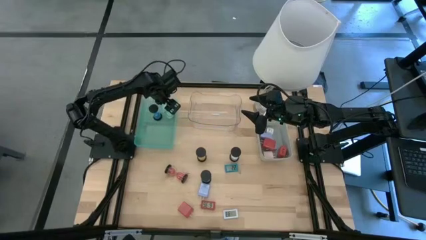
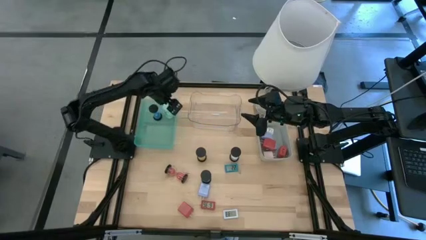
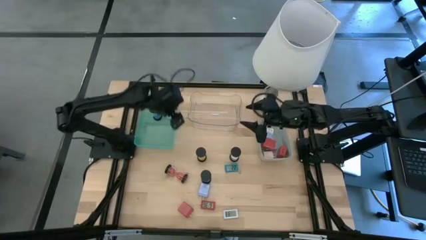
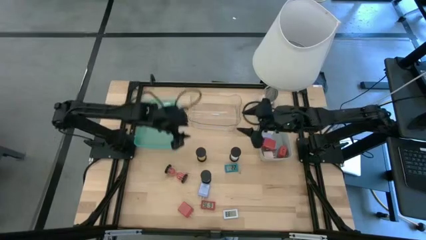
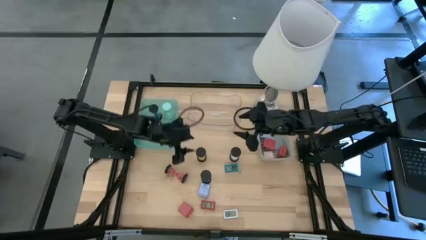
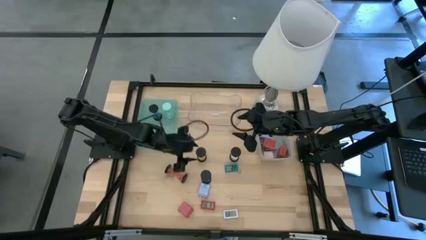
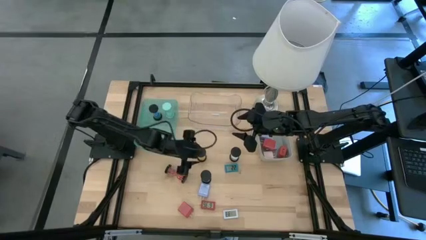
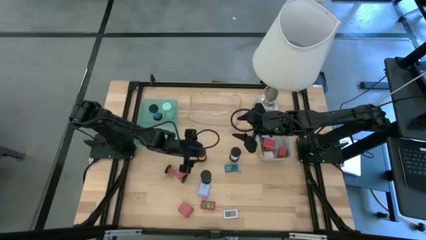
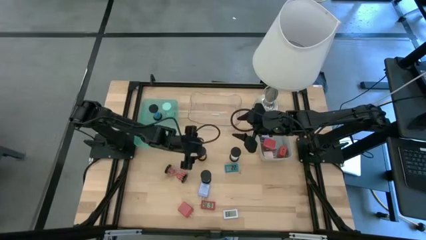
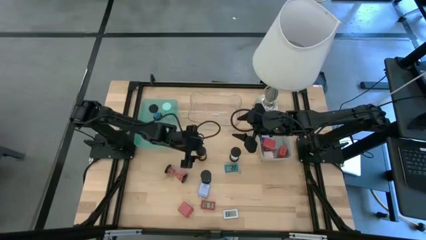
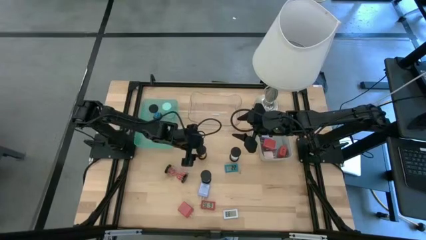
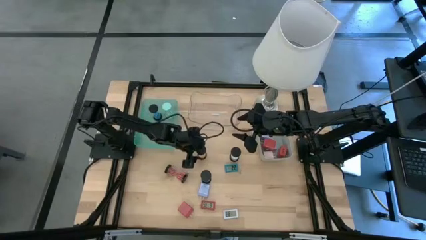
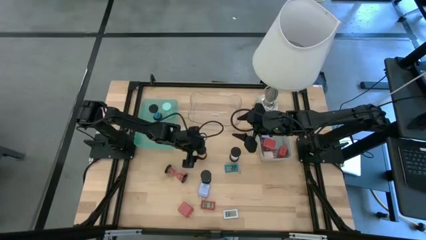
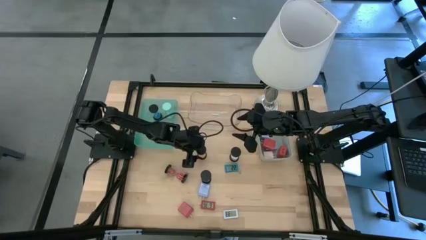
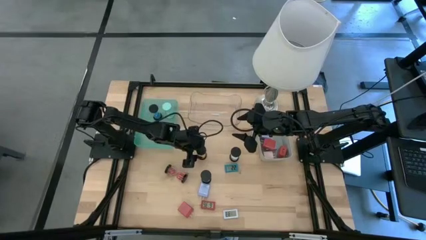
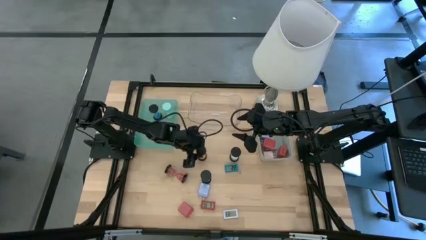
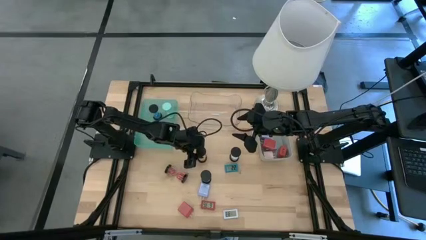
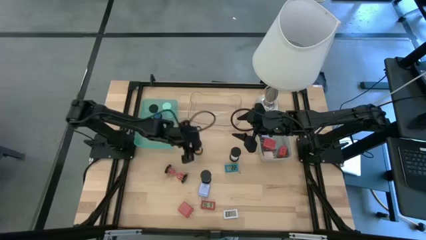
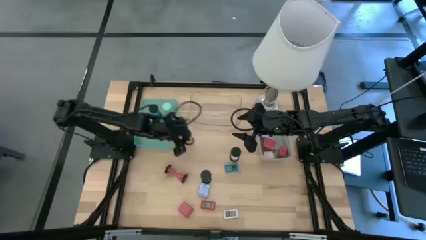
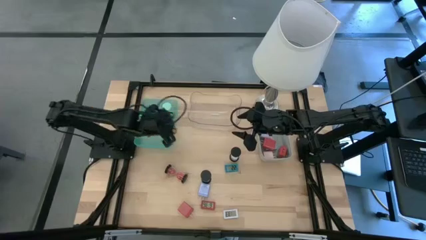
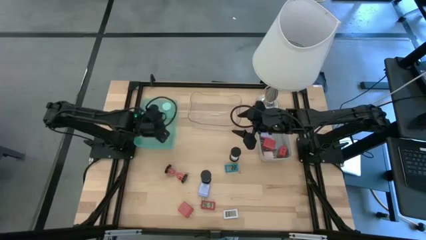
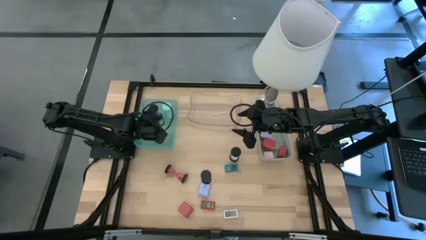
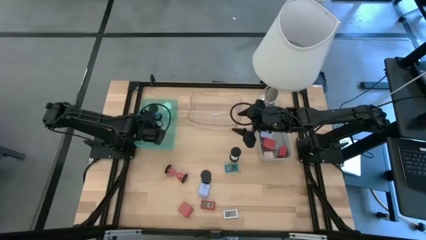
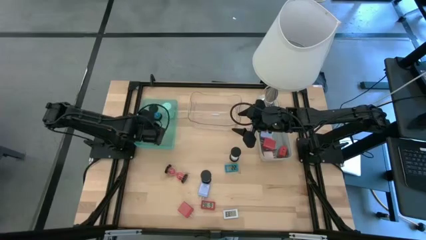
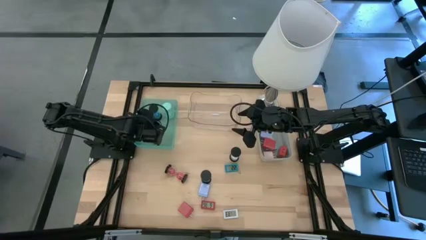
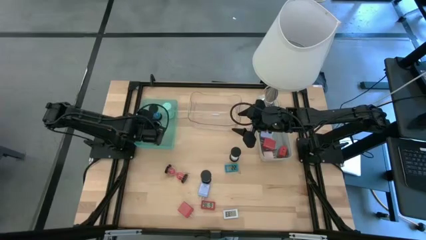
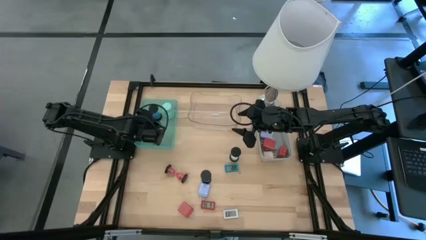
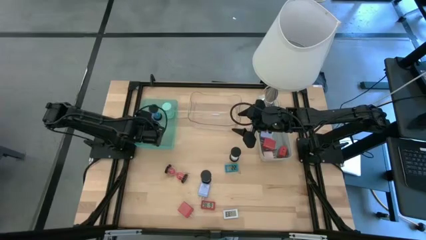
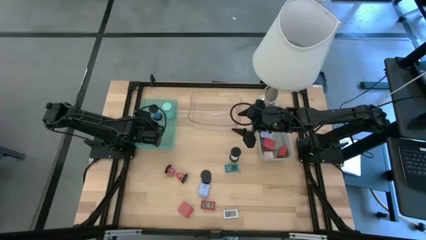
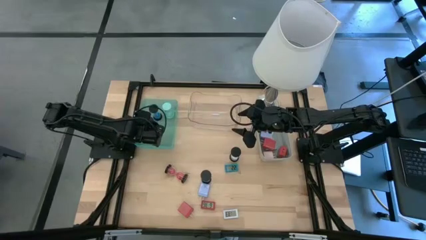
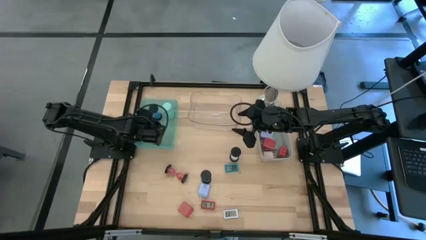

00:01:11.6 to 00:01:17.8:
Task: Pick & Place Office items
Put the black and orange hourglass into the green bin

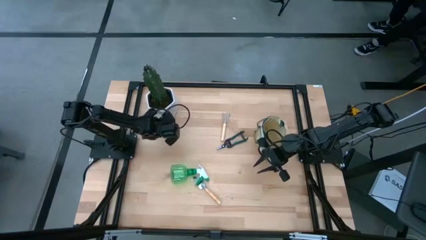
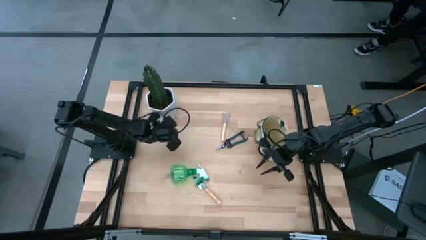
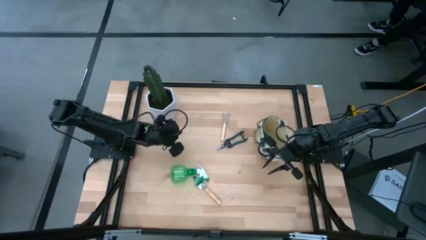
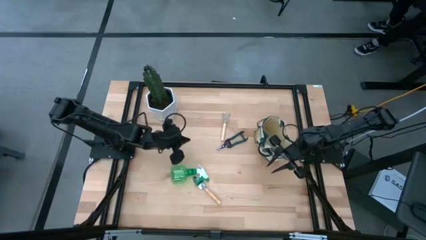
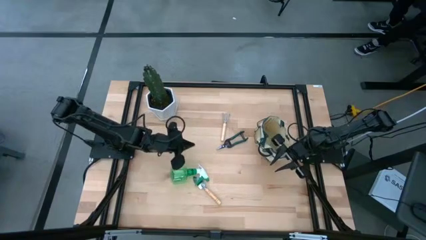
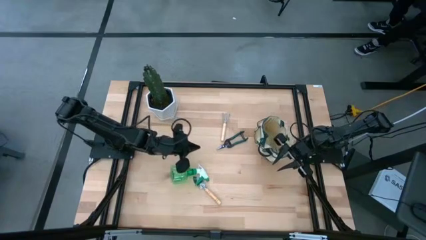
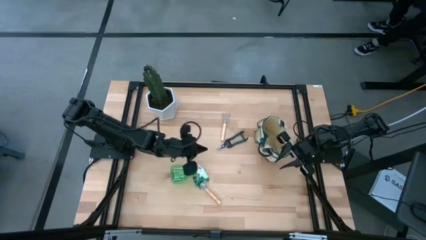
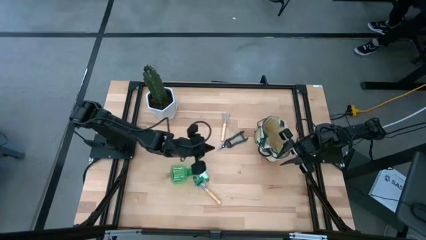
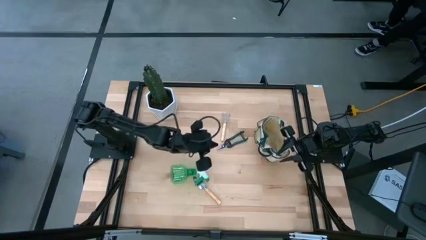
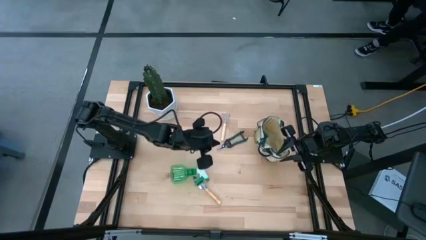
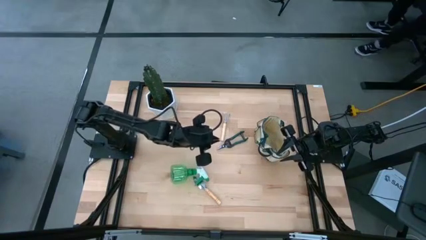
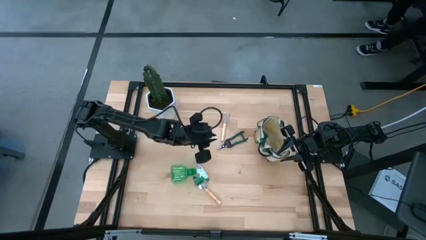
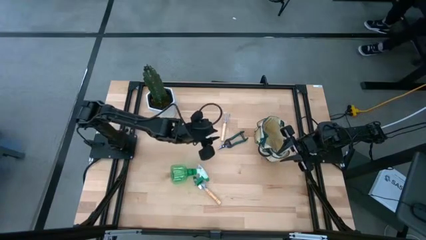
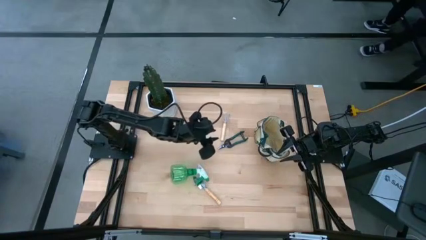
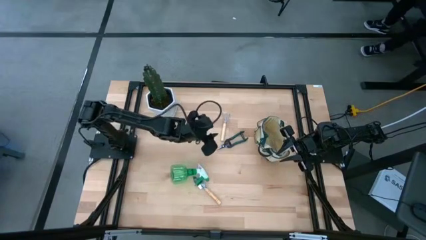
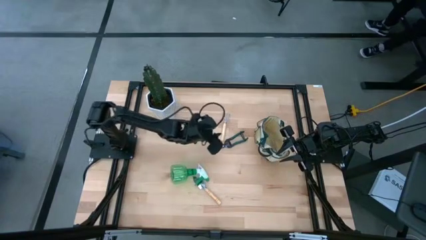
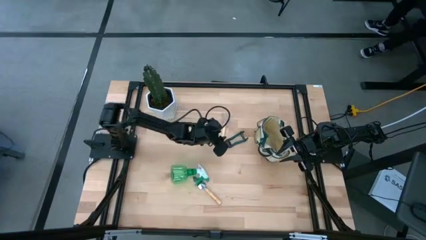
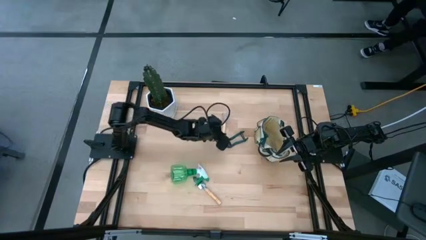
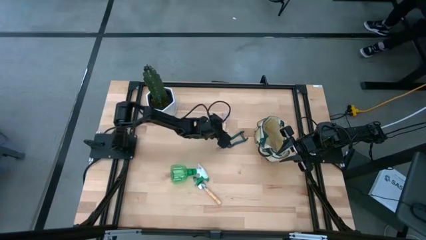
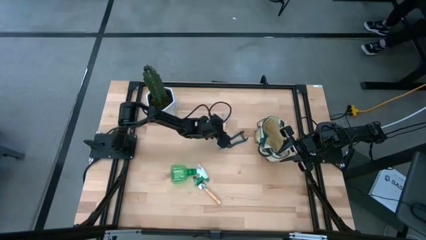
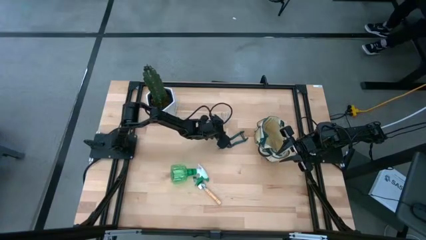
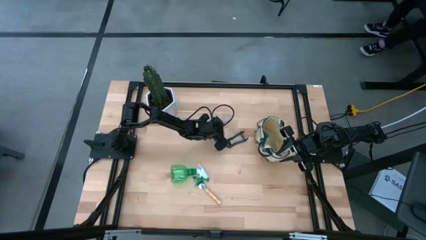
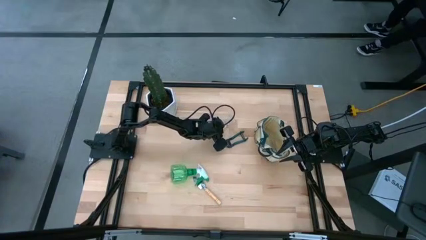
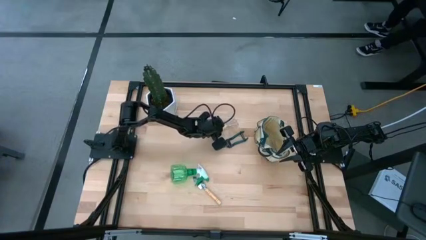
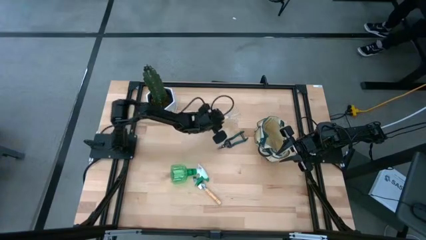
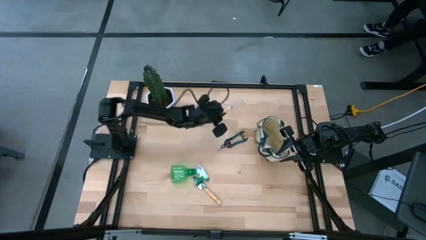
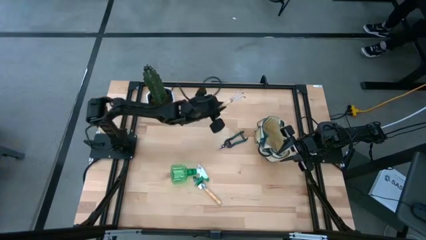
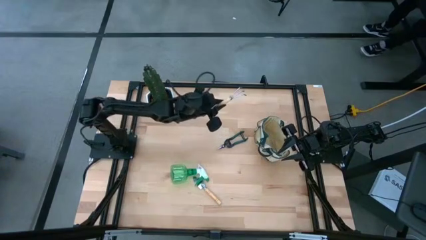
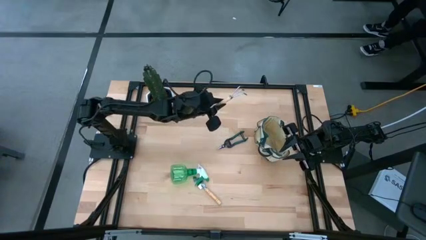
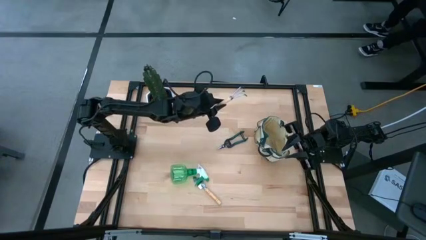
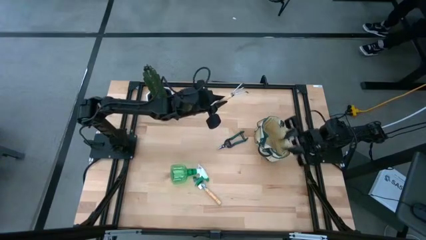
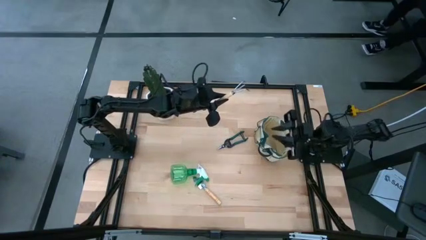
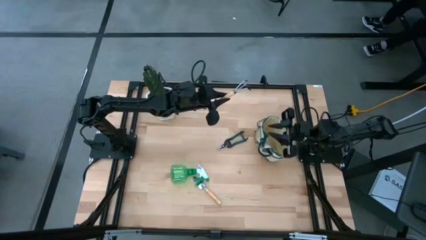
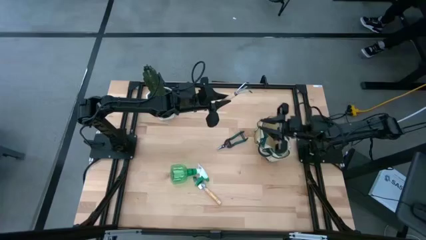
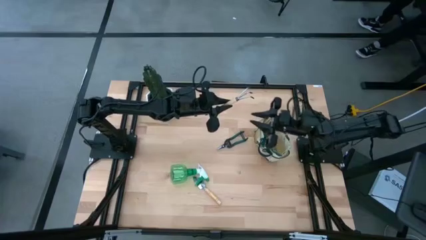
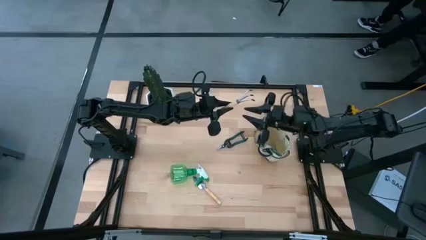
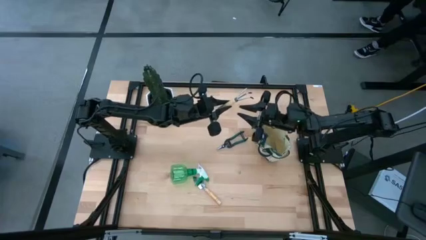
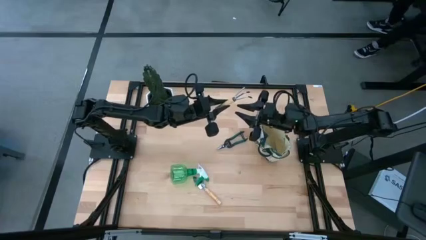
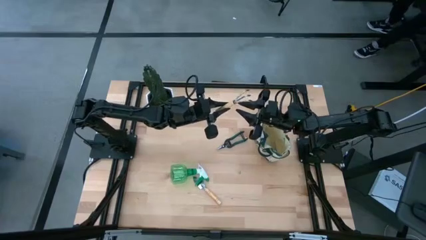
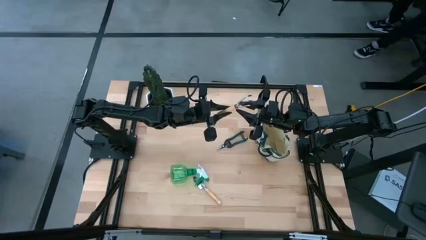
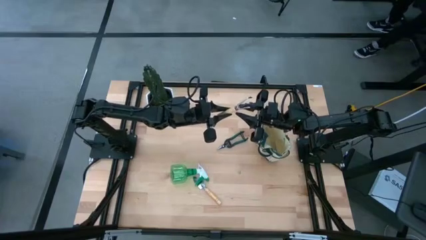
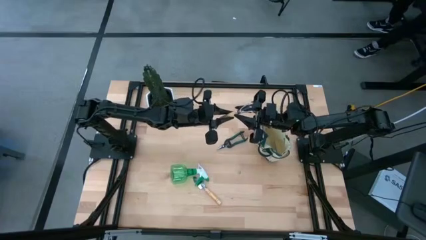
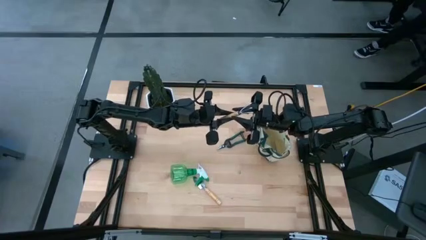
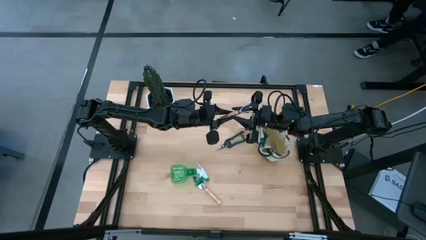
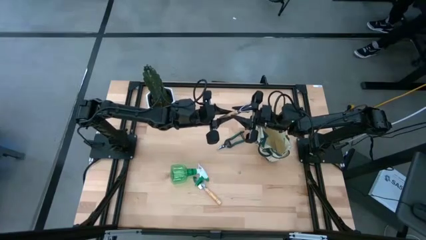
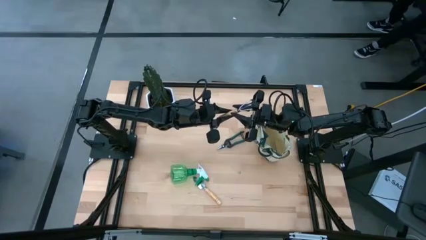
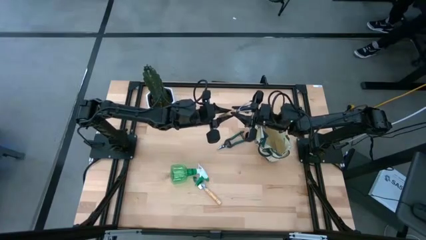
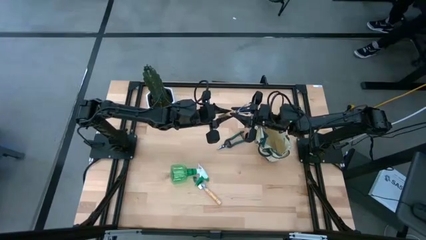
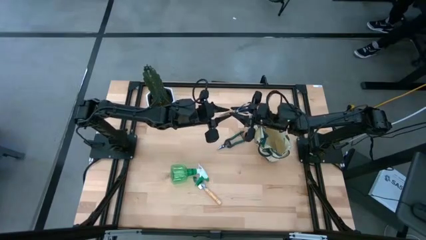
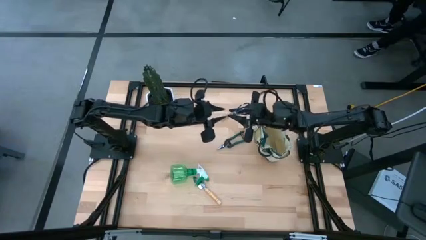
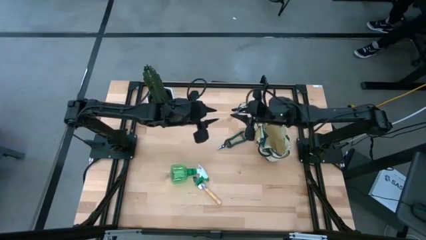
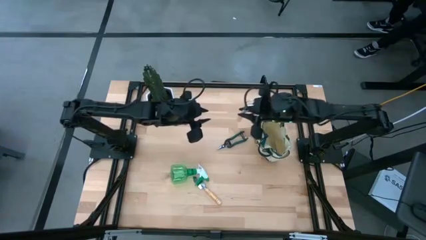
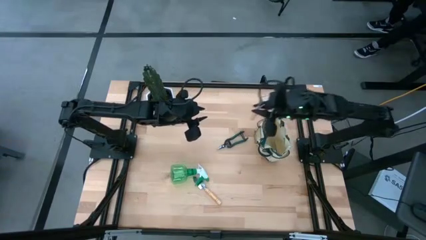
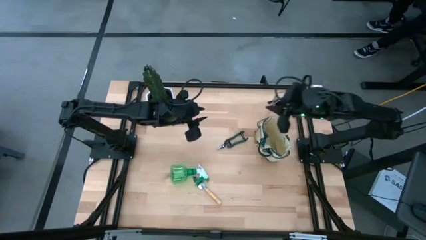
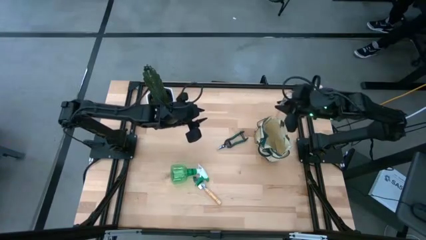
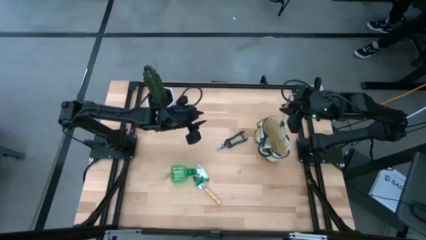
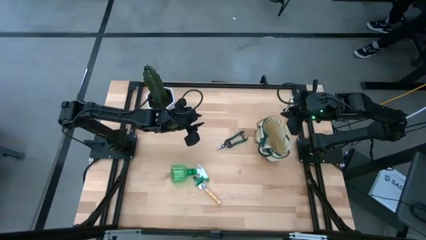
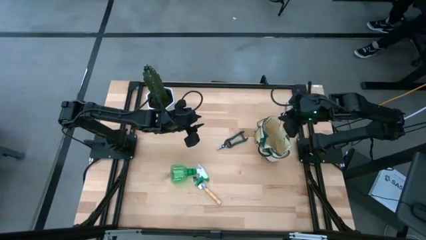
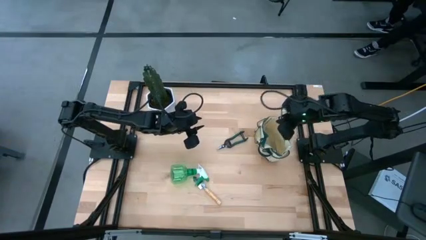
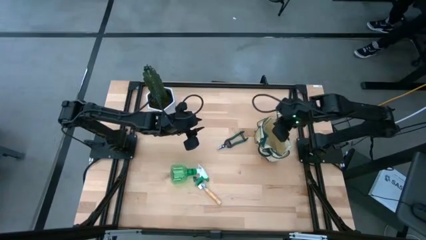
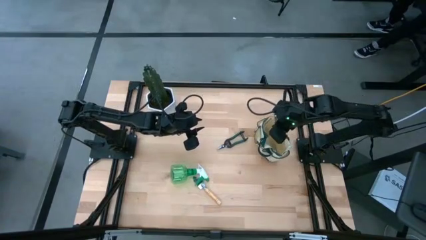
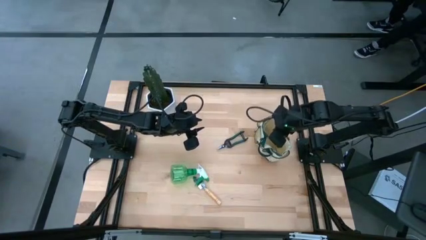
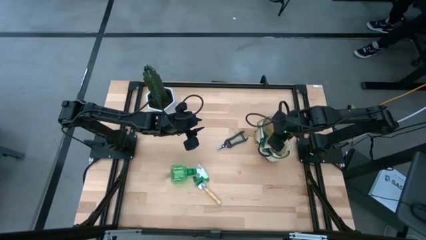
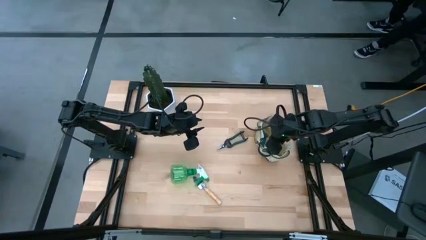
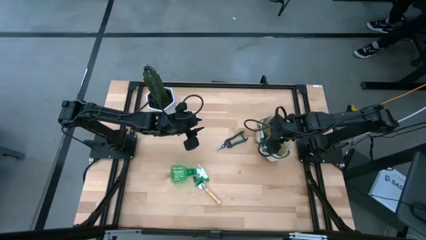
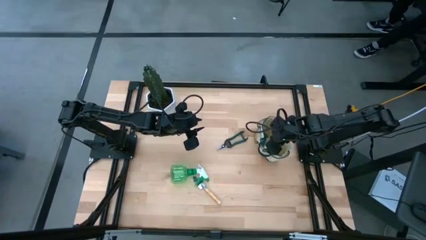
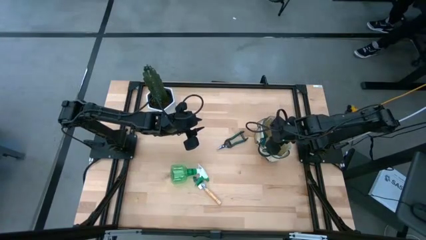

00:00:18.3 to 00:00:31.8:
Task: Pick & Place Garden tools in Gardening bag
Put the brown hand rake into the gardening bag
